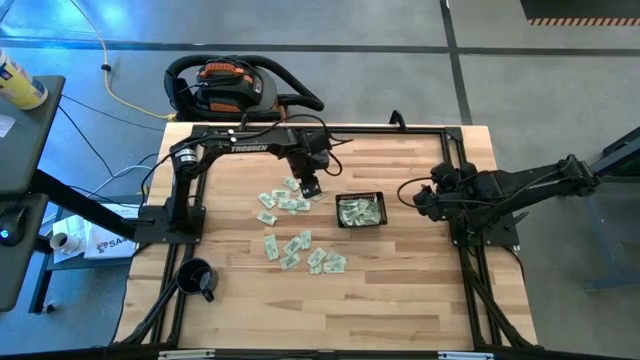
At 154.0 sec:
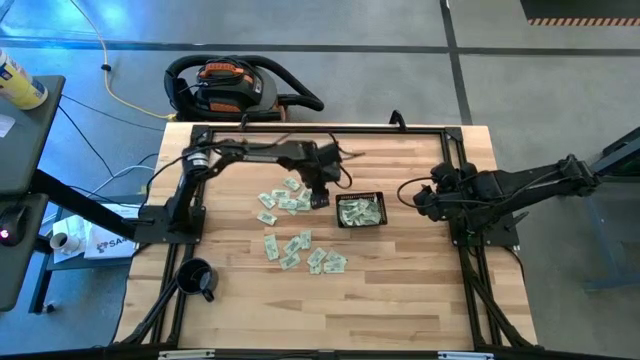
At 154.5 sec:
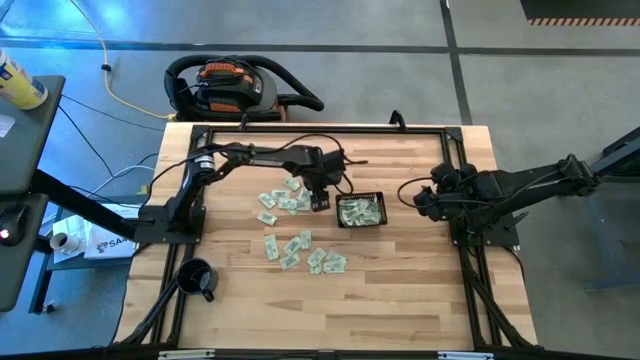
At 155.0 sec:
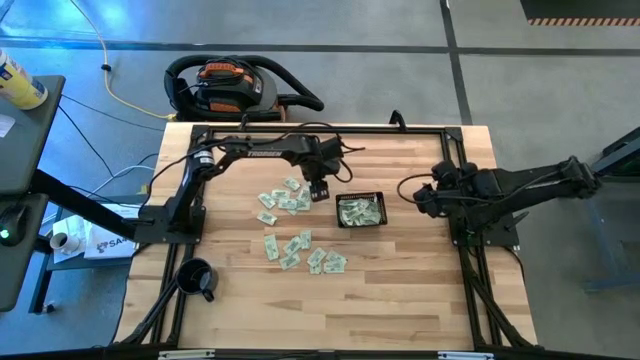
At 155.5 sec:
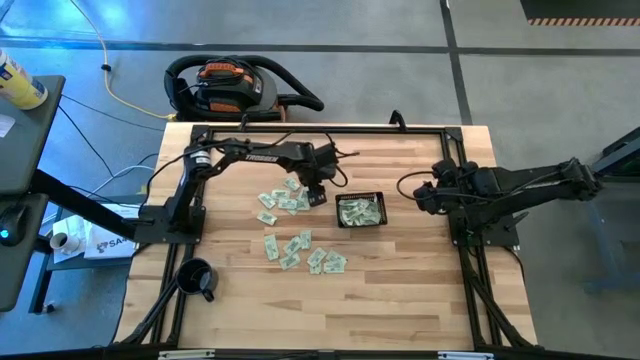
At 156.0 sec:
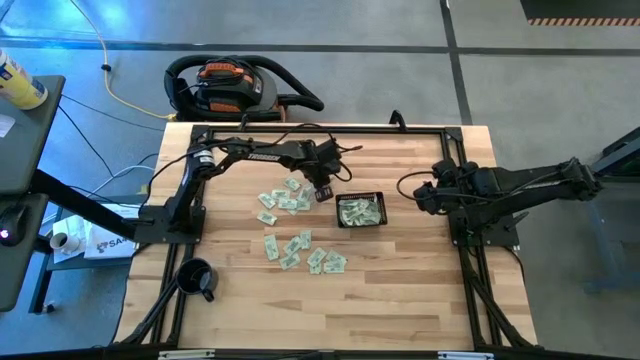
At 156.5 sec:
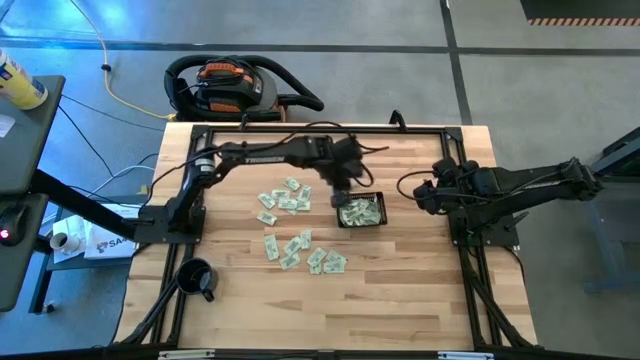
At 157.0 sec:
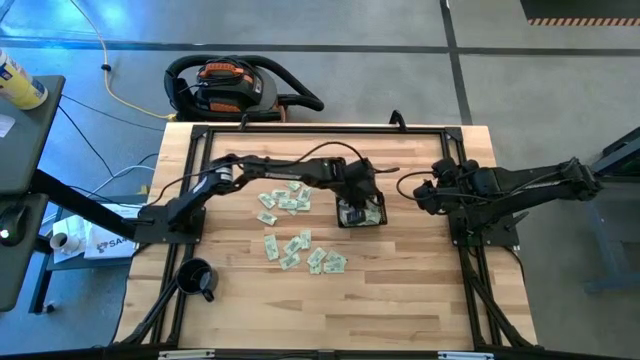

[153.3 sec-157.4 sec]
Task: Pick and place Stevia / Truvia into bins
Put the green stevia packet into the black bin

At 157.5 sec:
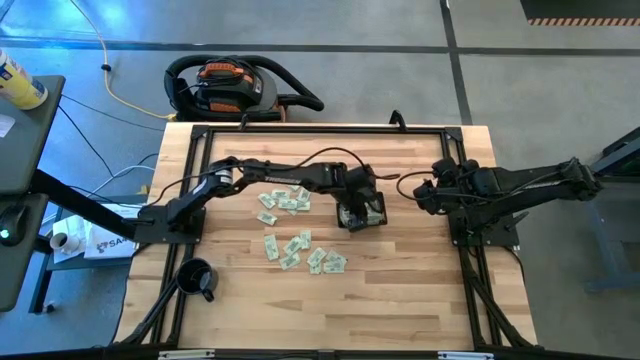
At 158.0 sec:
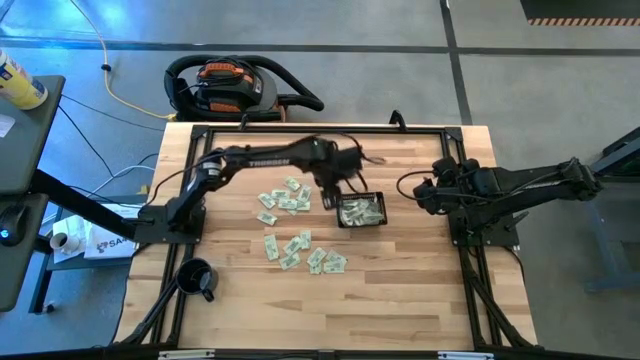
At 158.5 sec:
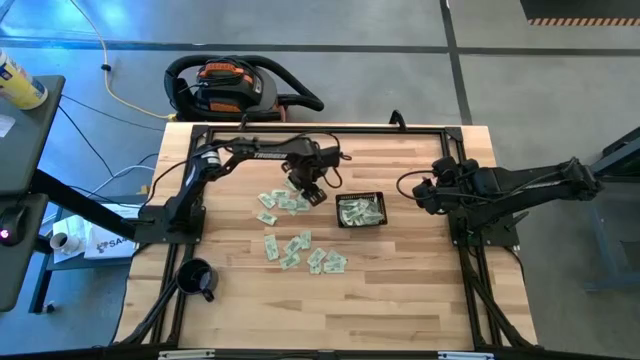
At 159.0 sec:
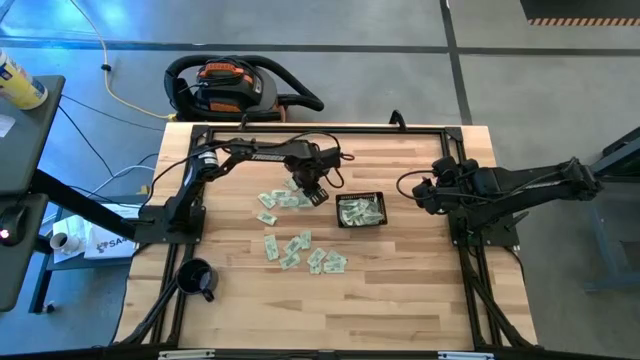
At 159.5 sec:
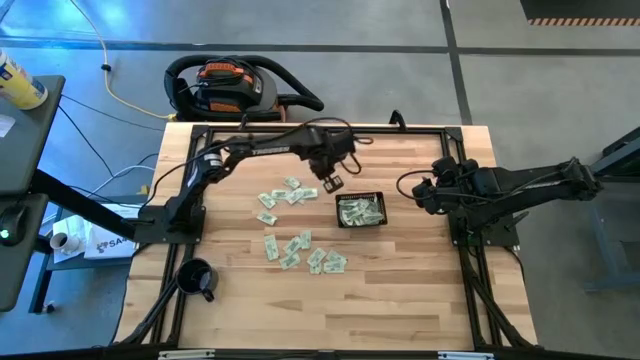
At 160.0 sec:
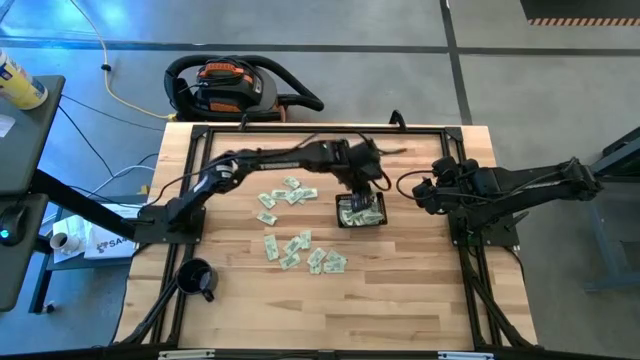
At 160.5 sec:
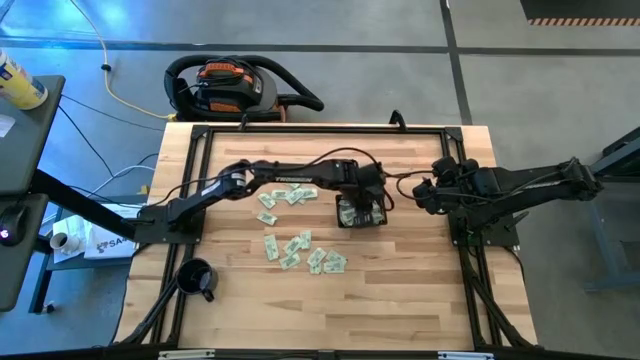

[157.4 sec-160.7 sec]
Put the green stevia packet into the black bin

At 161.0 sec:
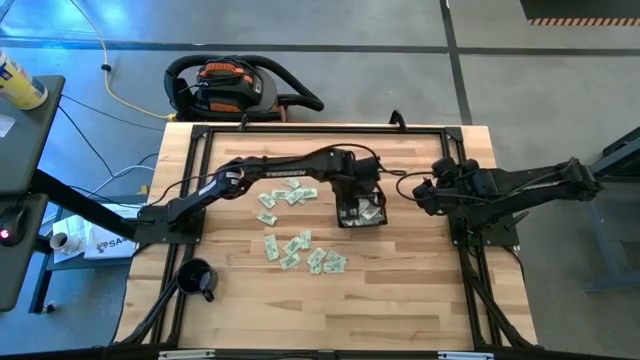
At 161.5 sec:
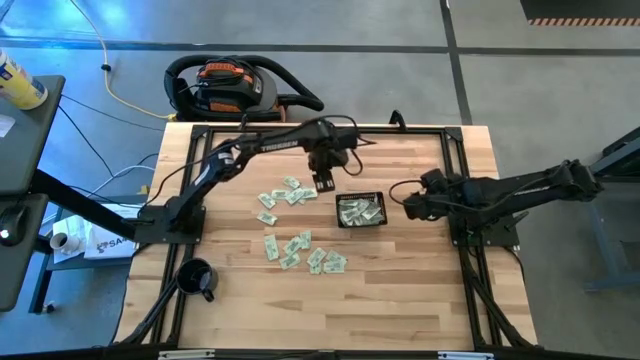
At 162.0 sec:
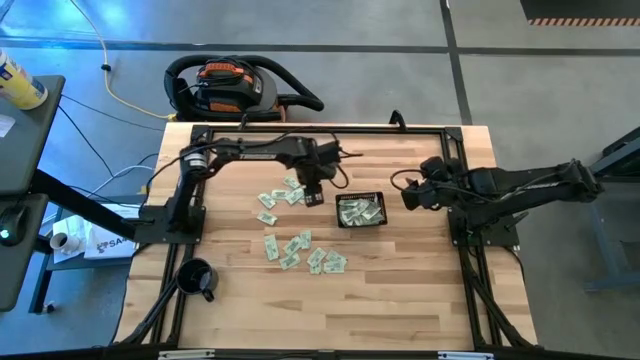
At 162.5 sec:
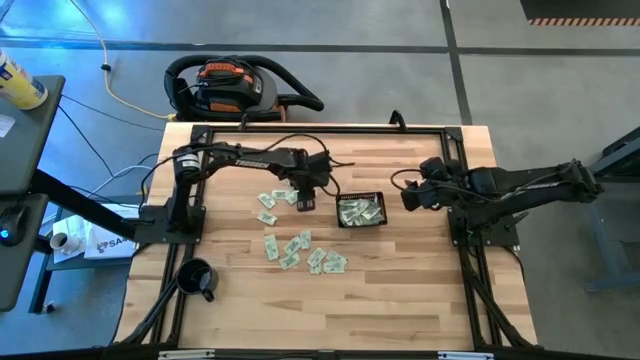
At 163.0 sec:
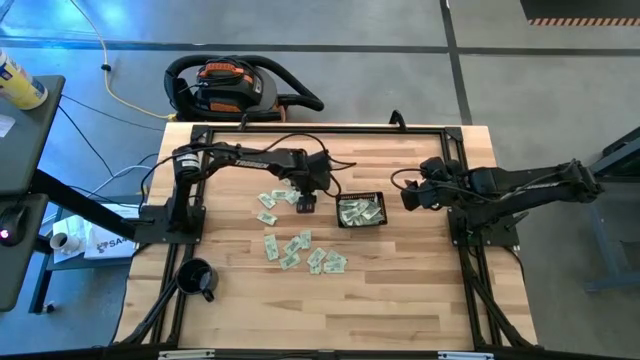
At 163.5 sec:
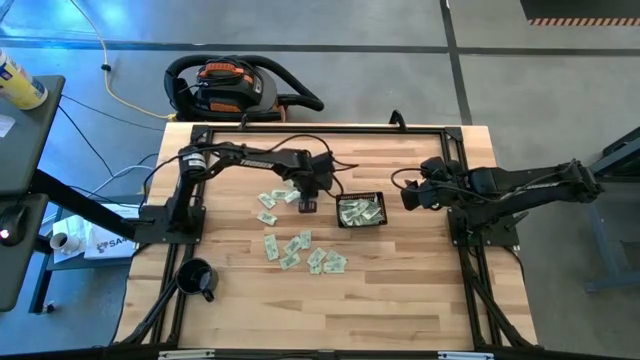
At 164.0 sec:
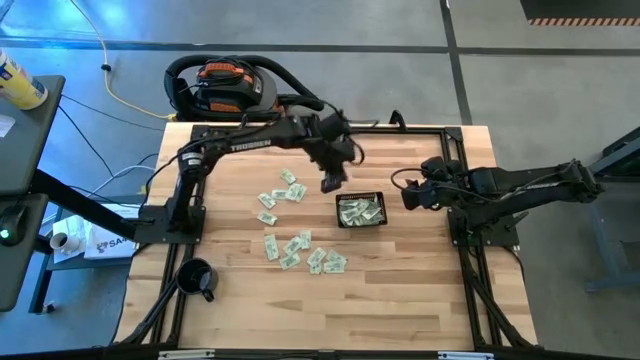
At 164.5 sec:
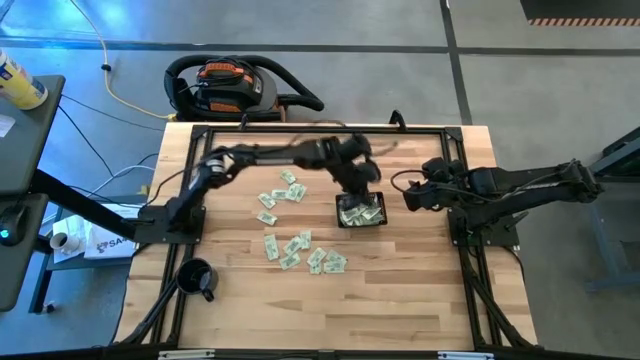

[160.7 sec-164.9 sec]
Put the green stevia packet into the black bin

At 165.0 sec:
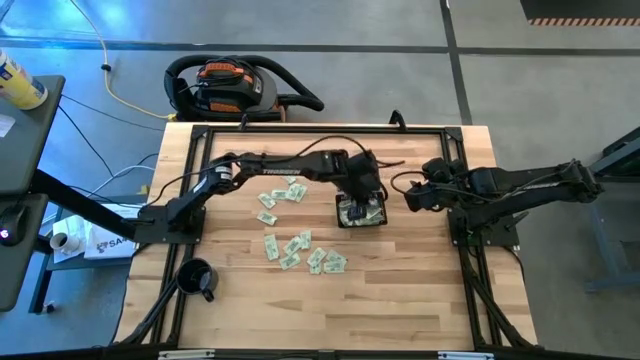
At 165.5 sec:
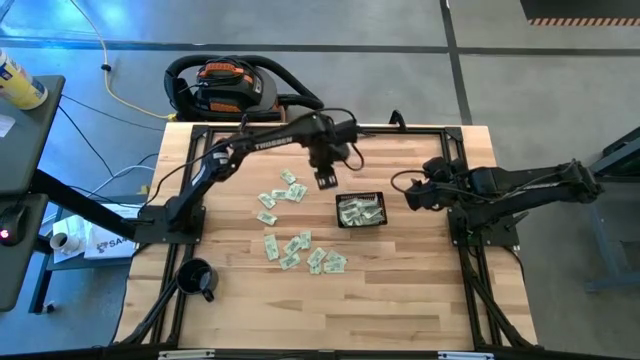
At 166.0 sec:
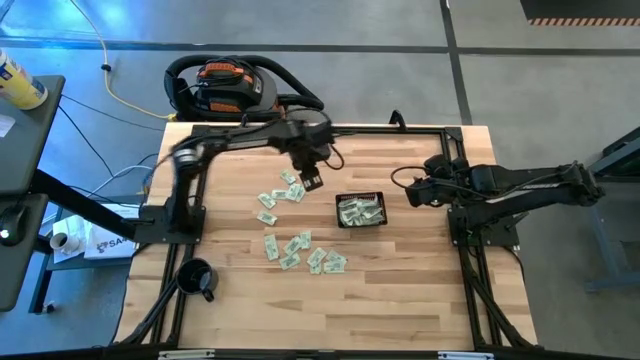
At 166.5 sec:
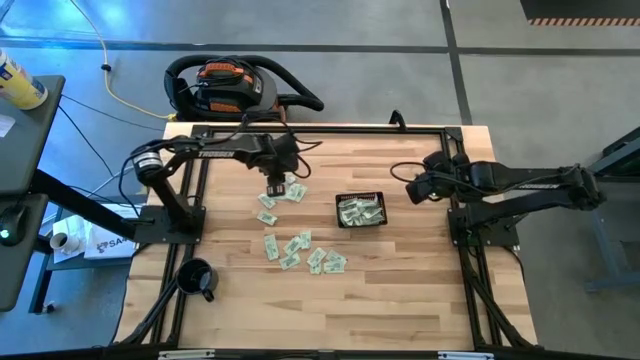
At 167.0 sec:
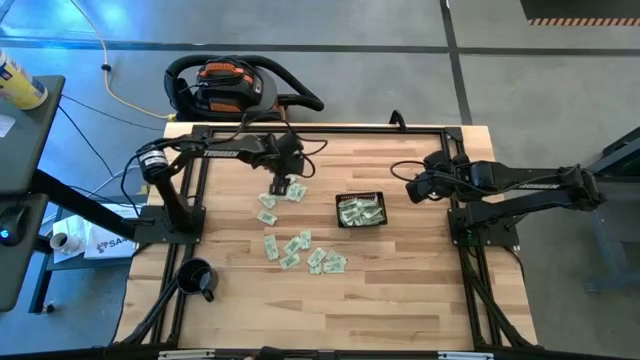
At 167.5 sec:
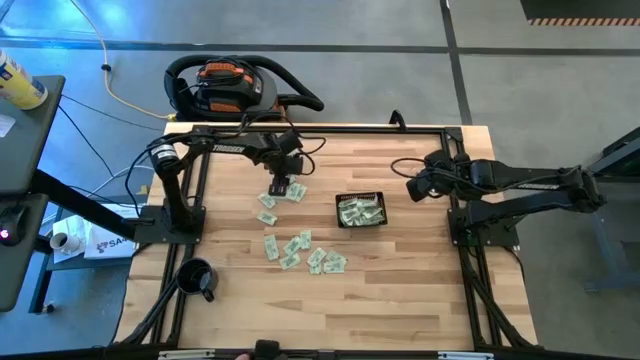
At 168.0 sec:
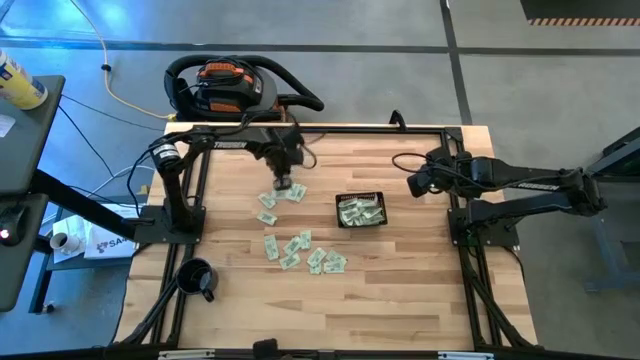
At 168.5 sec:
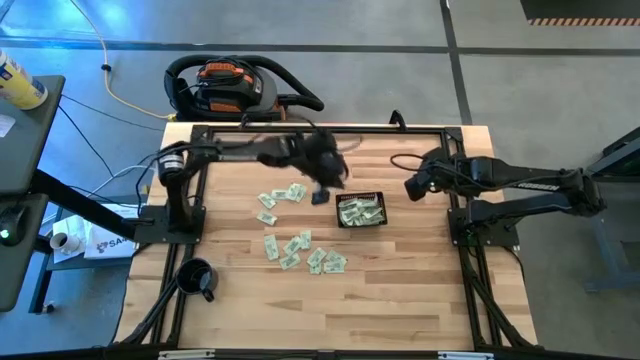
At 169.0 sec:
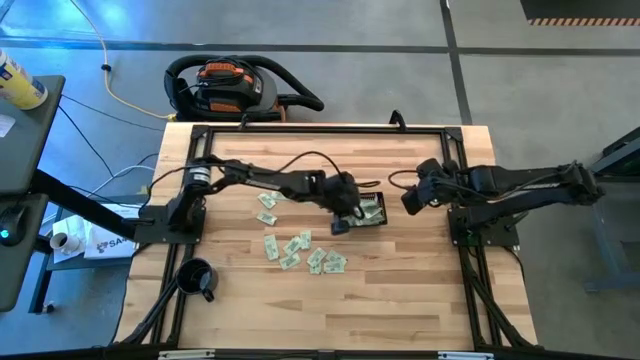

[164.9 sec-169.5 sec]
Put the green stevia packet into the black bin

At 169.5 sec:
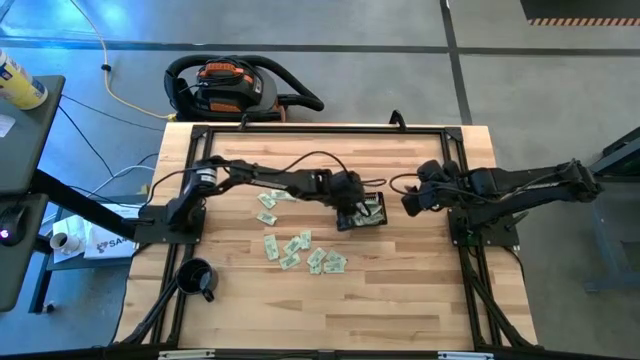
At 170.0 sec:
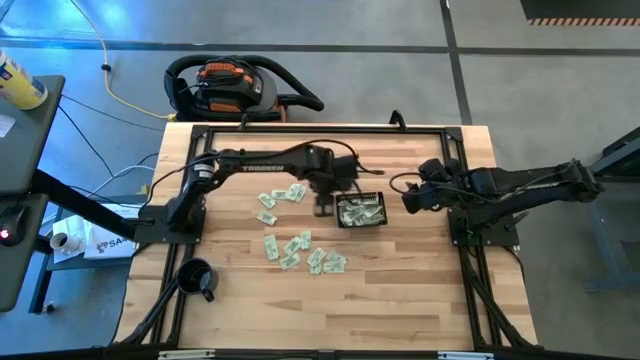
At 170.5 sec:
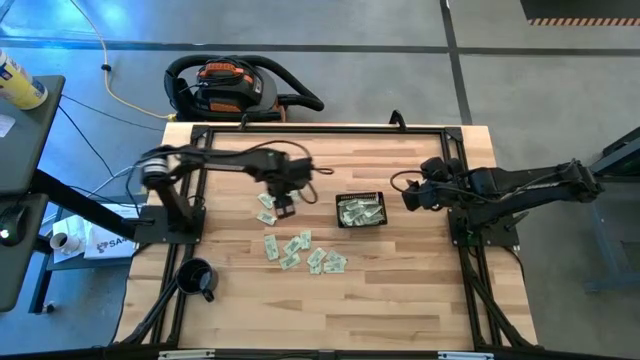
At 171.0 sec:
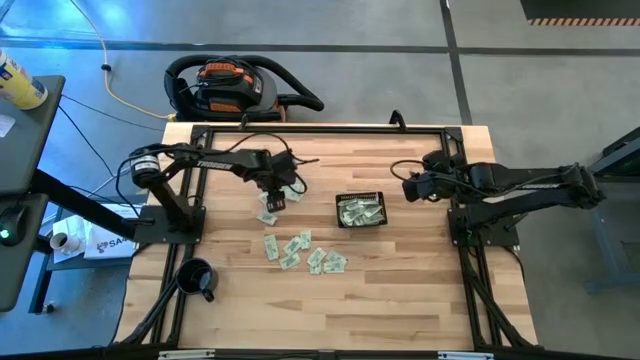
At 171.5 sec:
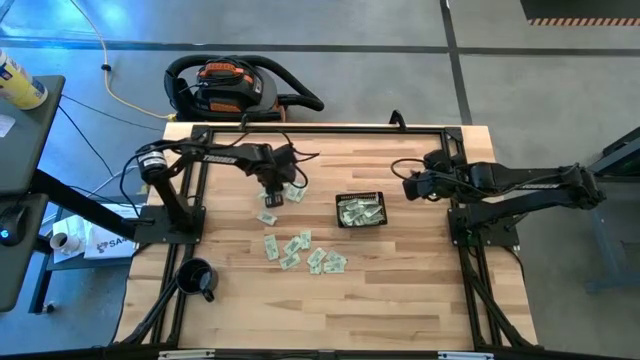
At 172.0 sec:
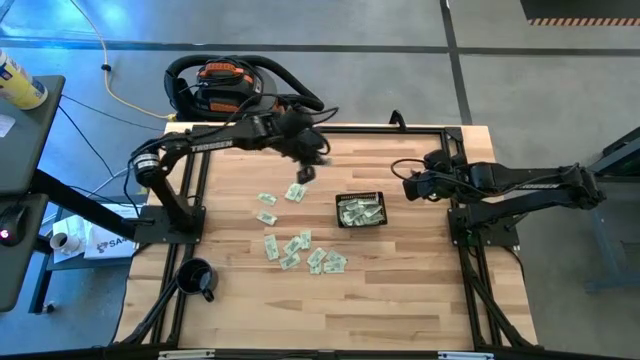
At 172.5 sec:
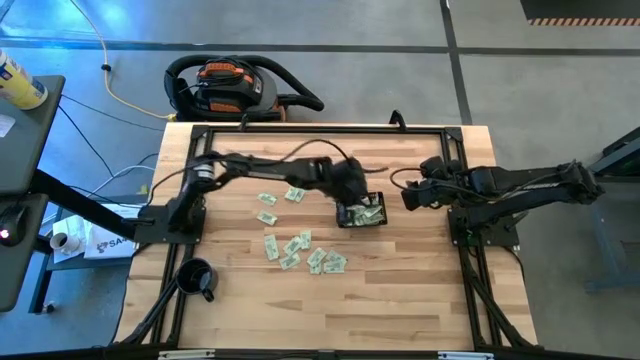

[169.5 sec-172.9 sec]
Put the green stevia packet into the black bin

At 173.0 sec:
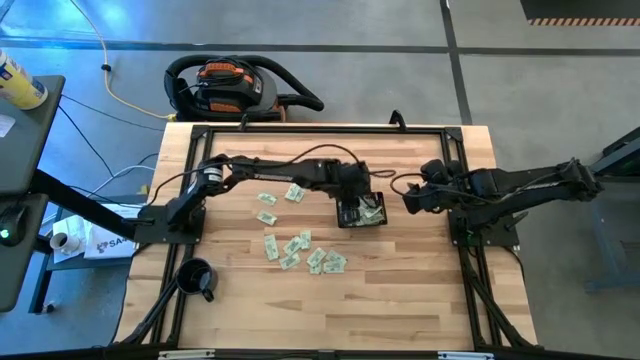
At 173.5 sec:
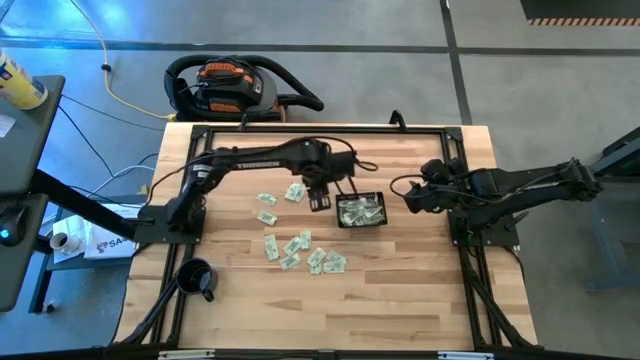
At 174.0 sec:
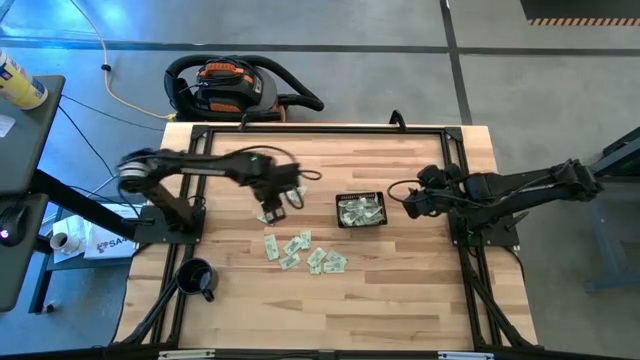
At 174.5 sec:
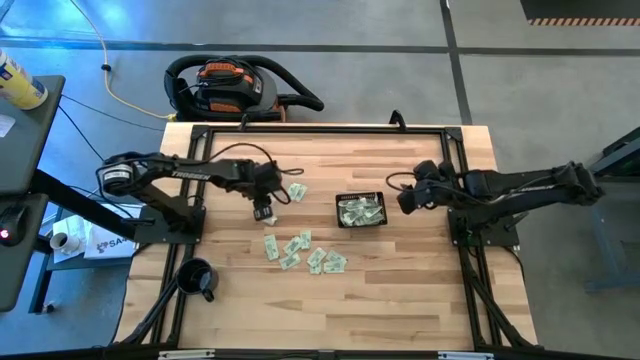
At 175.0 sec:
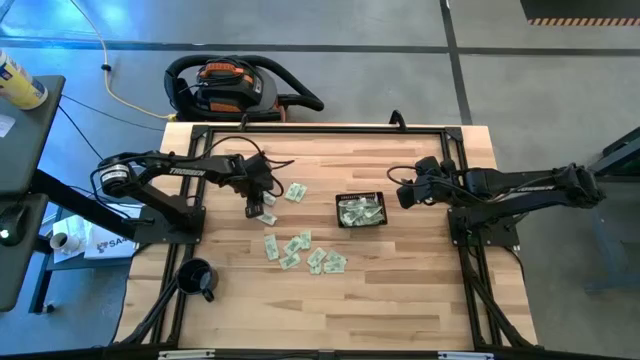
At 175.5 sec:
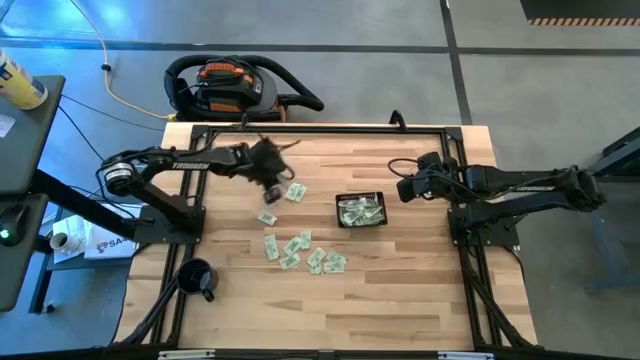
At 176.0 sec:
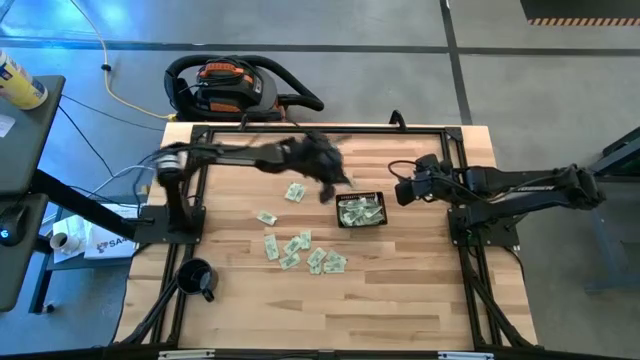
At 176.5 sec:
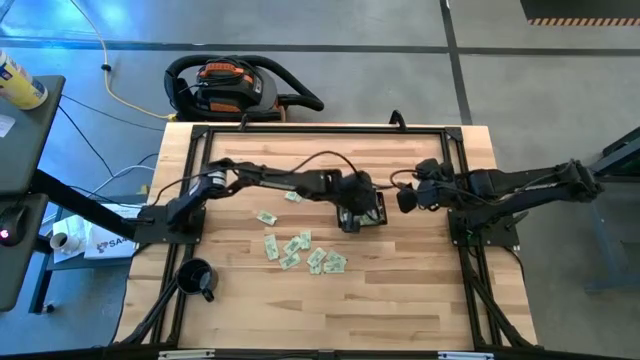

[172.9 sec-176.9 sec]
Put the green stevia packet into the black bin
